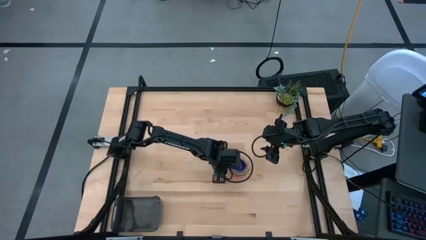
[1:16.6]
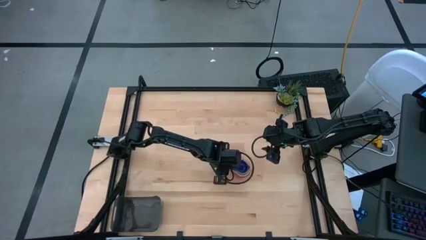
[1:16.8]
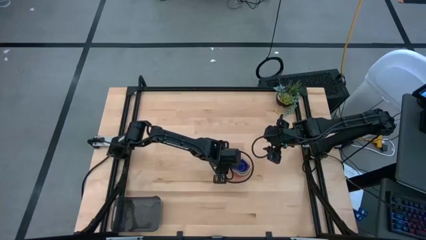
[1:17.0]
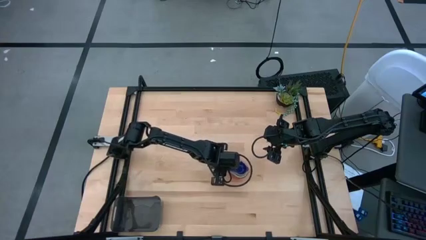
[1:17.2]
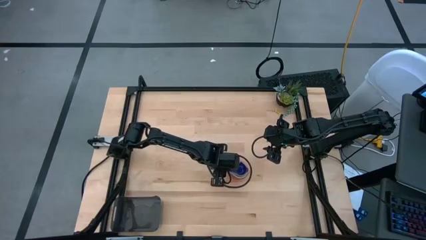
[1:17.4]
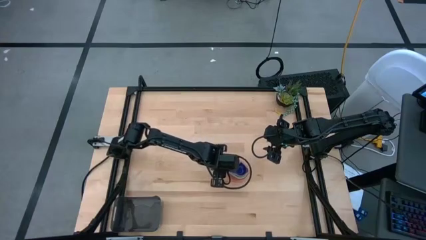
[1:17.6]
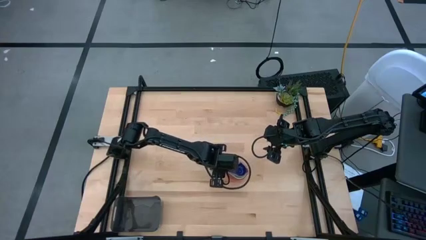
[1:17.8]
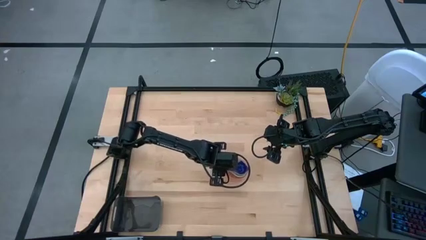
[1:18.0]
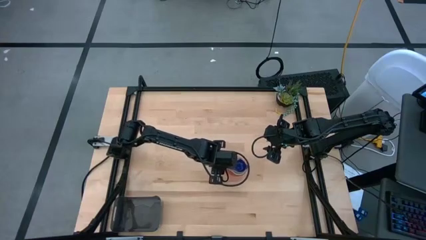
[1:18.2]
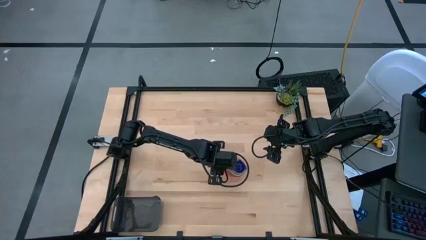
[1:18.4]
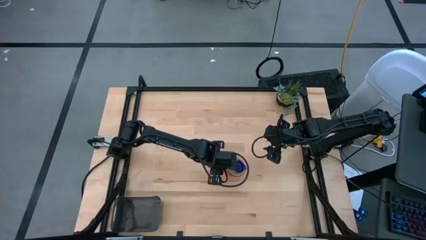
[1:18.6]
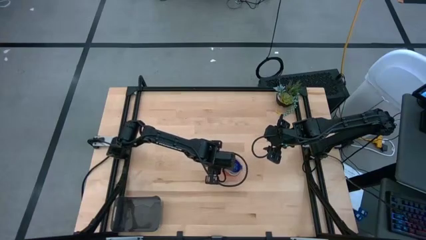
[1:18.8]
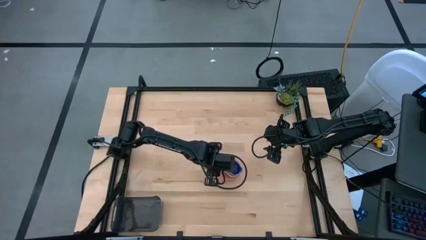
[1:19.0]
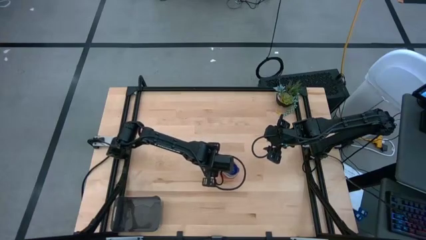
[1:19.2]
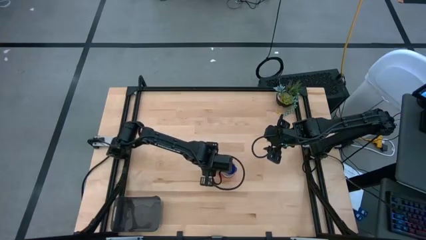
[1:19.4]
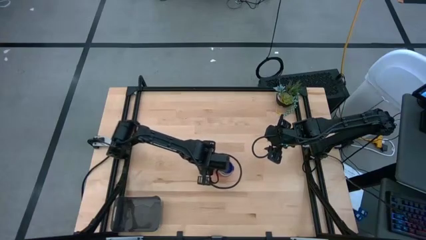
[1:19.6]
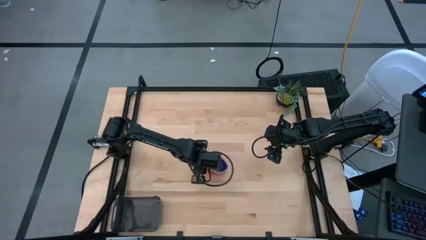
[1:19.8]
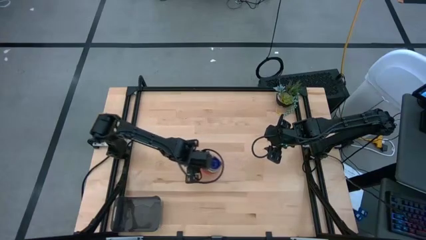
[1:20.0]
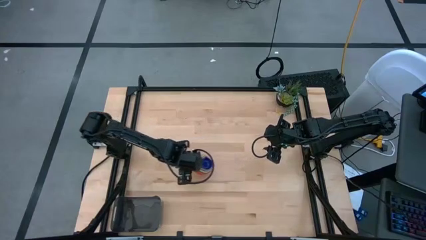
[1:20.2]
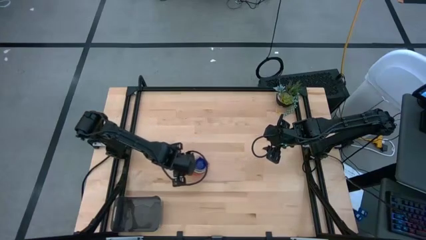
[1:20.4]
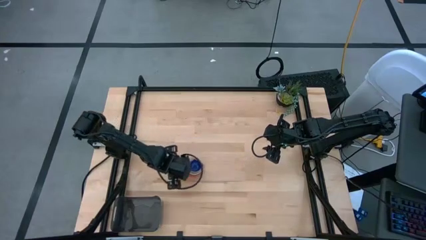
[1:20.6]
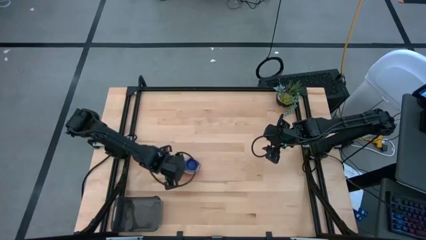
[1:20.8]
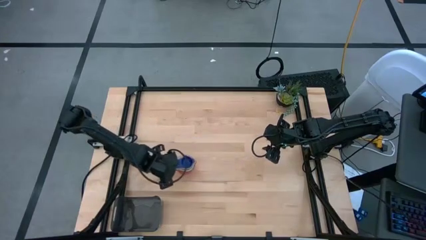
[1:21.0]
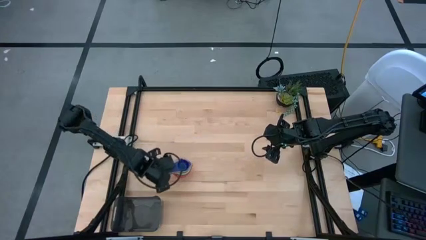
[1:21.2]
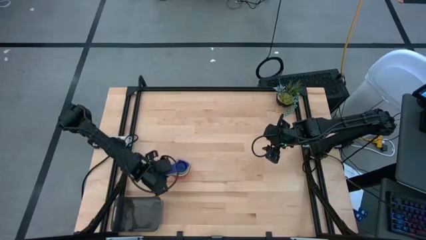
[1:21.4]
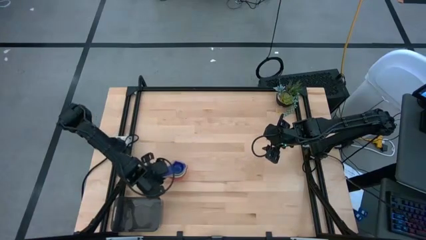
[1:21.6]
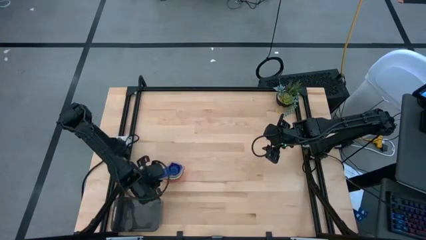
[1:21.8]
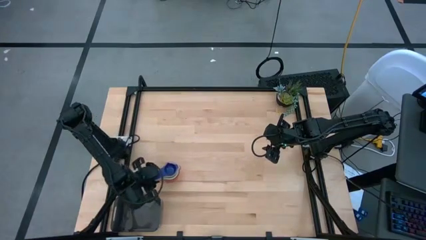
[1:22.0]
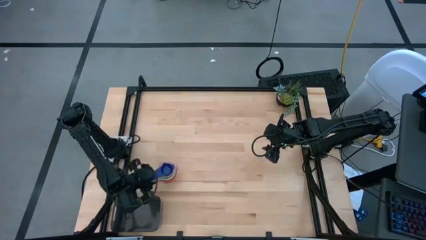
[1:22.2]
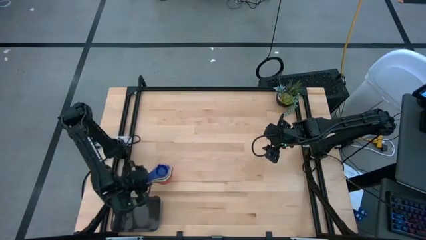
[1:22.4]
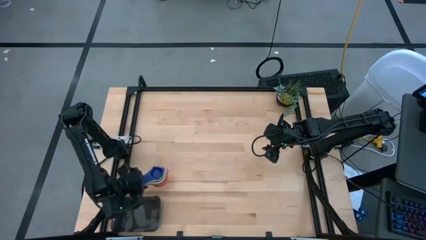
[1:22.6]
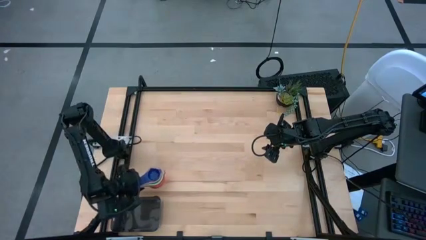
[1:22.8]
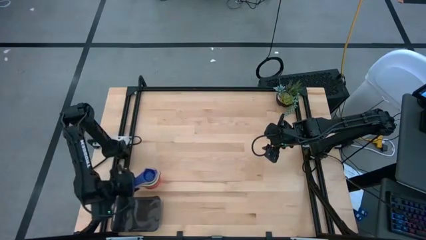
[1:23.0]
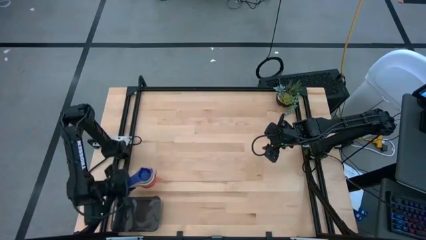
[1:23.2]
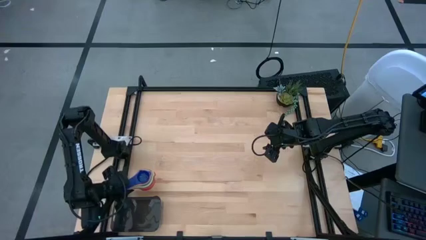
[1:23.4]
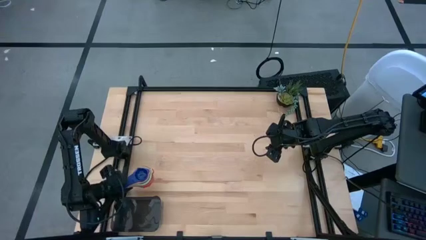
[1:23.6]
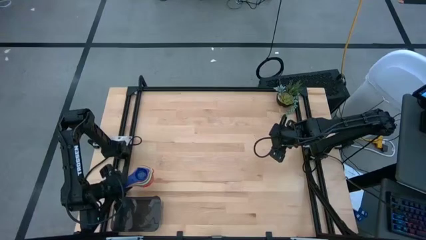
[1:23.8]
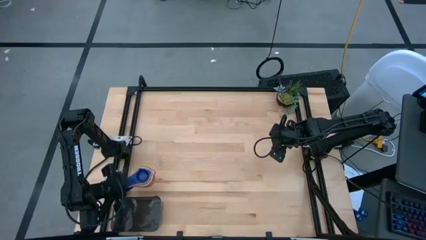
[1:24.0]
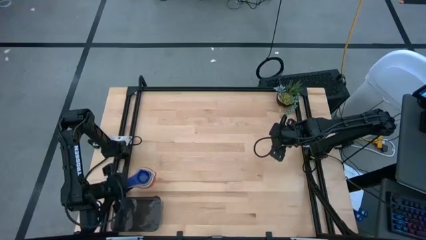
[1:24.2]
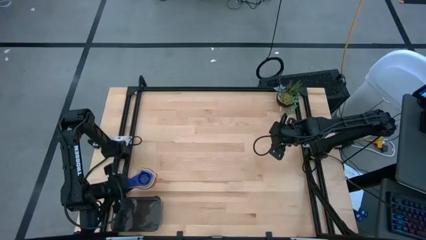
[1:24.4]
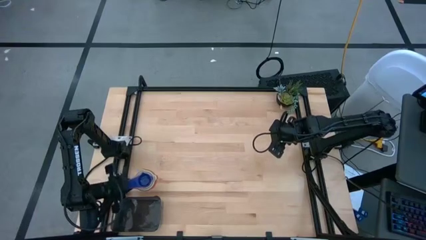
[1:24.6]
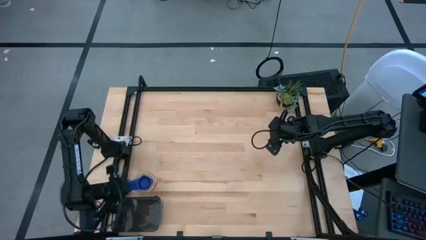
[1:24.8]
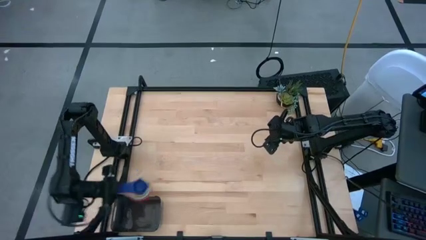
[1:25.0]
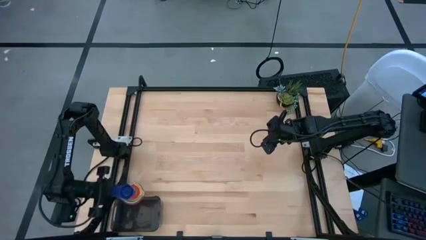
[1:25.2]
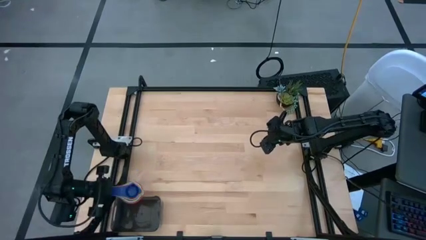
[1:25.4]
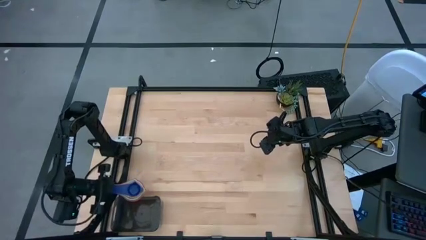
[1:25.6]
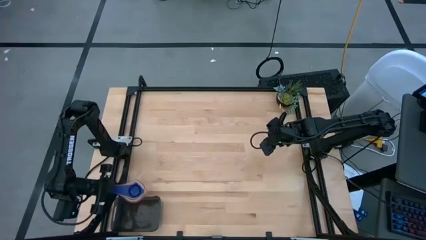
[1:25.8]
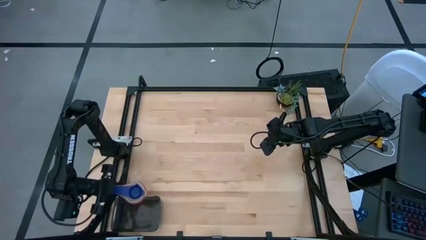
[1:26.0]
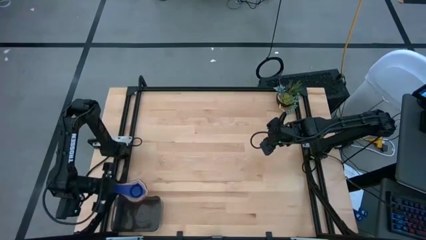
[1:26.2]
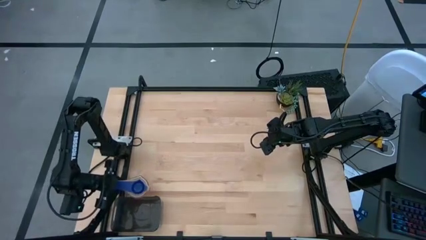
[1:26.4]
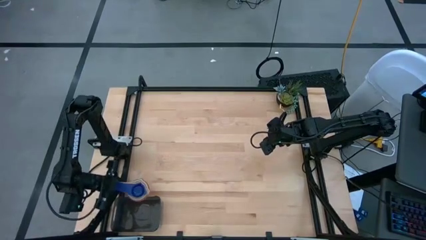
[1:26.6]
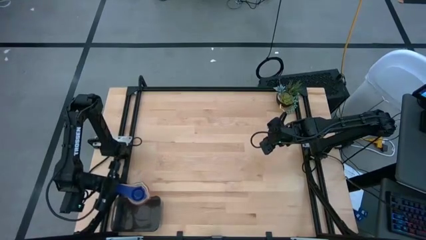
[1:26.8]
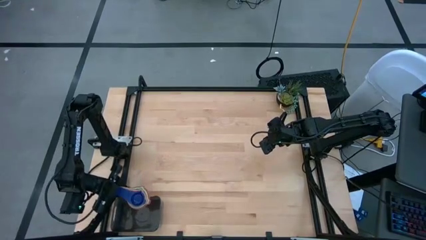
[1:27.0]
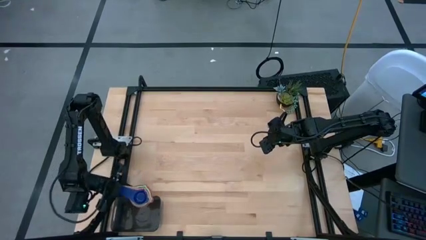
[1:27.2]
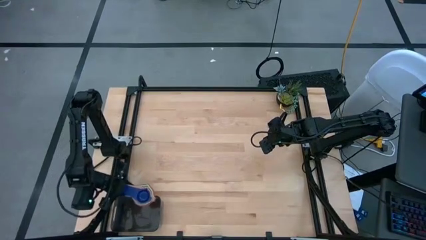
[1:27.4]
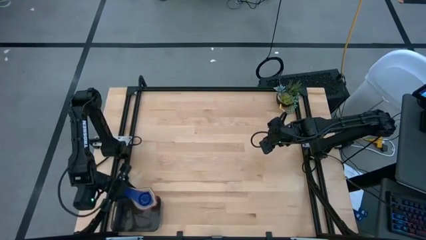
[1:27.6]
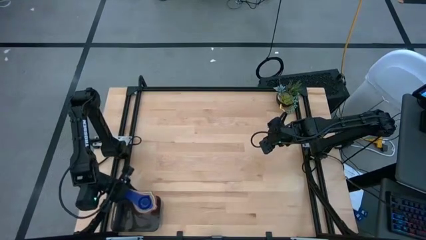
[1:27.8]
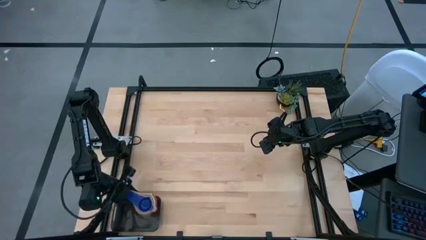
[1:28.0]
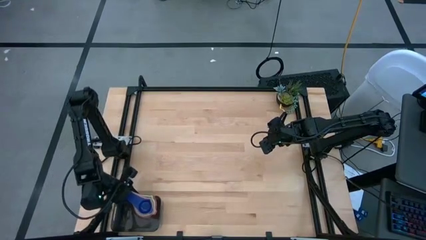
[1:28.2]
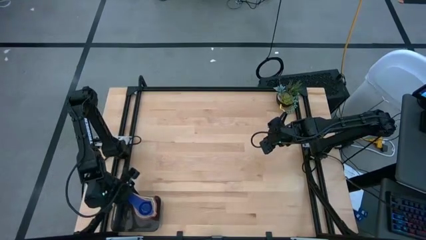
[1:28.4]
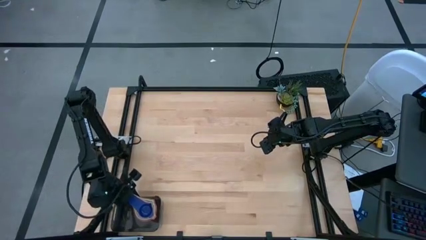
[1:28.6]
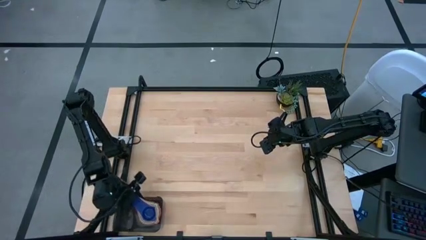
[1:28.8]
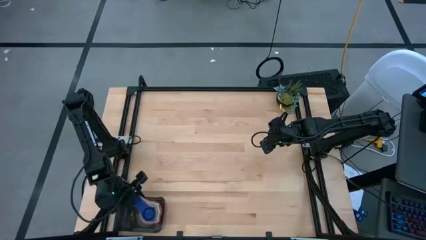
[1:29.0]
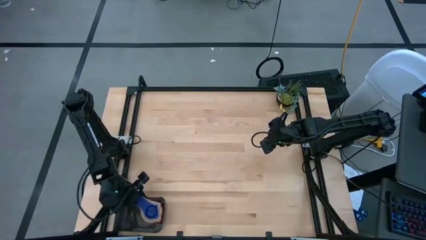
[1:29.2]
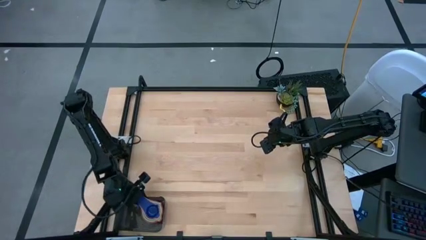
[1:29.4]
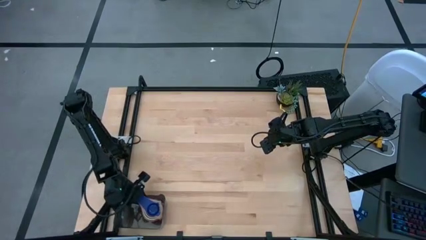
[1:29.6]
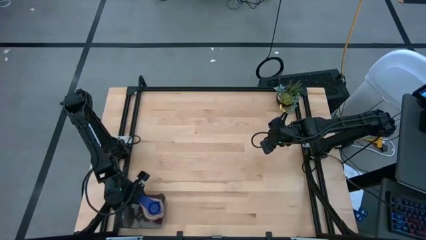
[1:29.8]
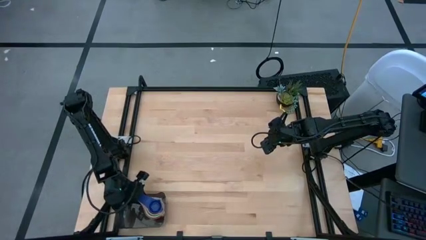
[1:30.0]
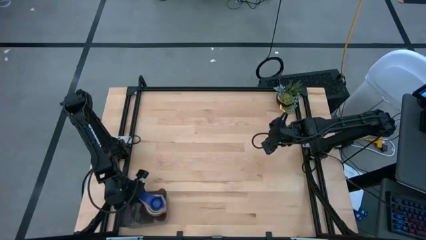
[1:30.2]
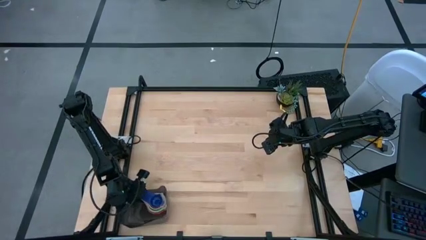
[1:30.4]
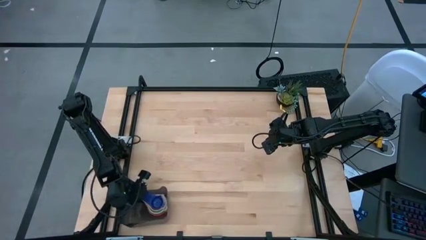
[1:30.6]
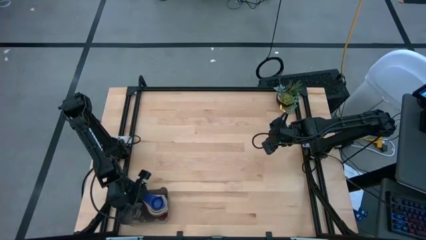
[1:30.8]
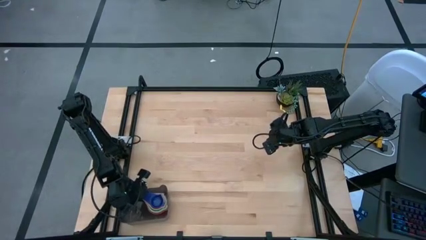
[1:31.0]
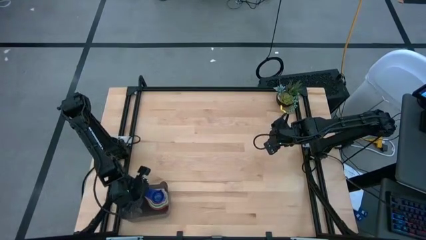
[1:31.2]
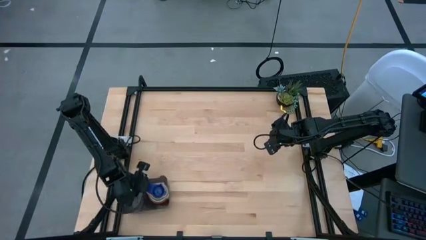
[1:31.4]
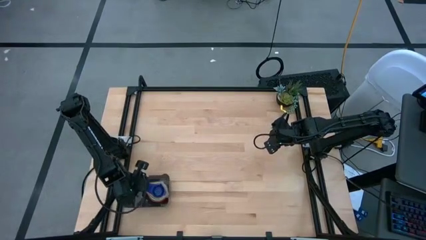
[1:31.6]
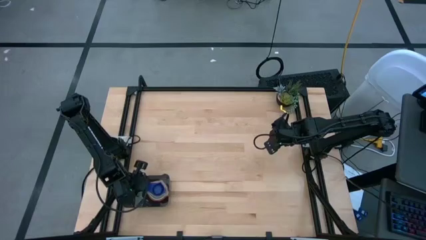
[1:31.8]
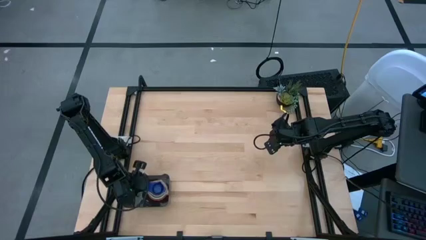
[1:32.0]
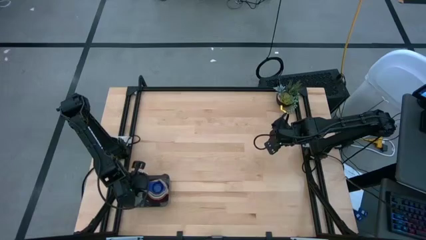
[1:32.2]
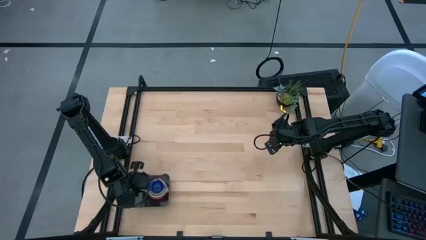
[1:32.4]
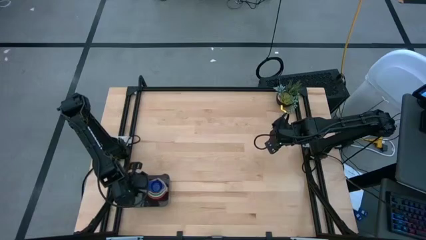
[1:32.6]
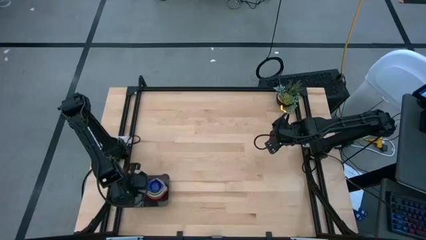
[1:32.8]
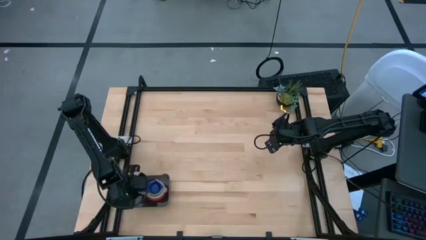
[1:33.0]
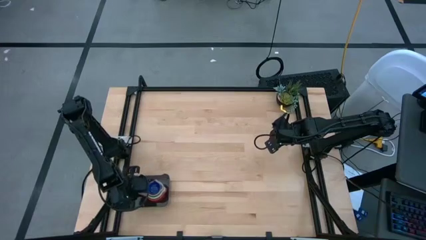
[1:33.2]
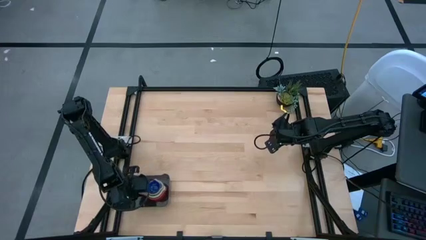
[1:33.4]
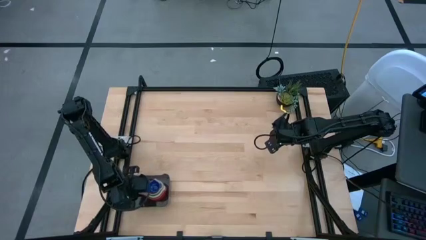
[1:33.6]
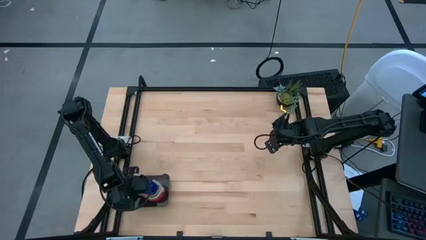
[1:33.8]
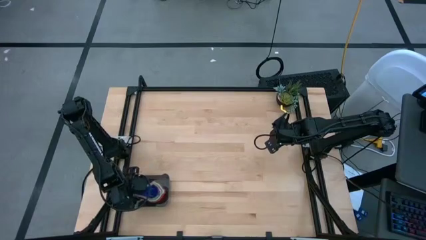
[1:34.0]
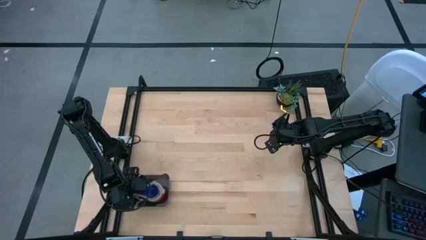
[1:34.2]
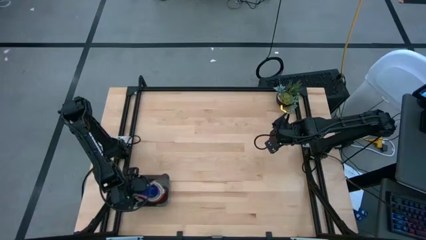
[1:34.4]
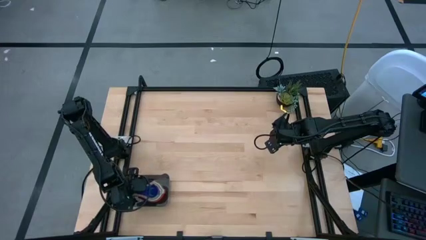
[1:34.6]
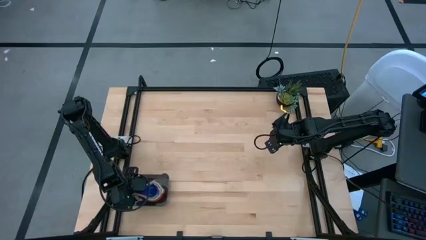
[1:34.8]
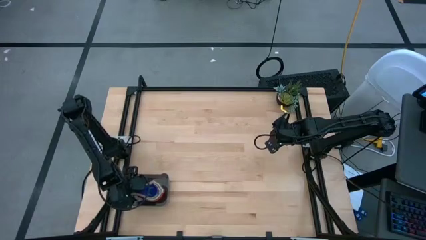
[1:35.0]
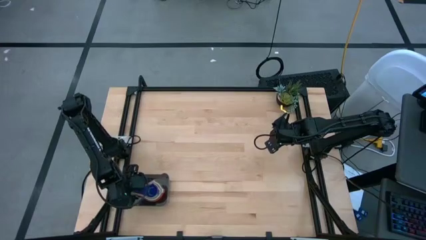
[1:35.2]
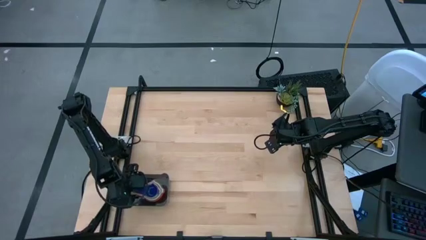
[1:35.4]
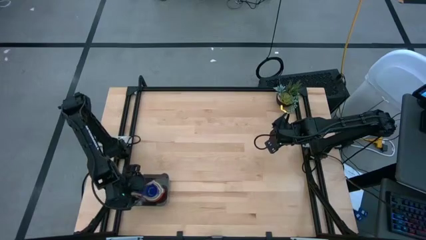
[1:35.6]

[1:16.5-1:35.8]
Task: Nest measuring cups in basket
Put the nested measuring cups into the black bin
